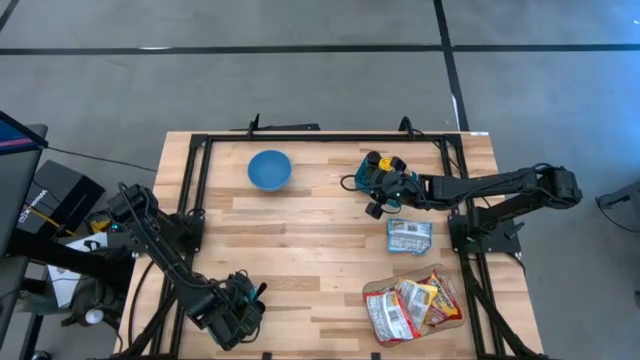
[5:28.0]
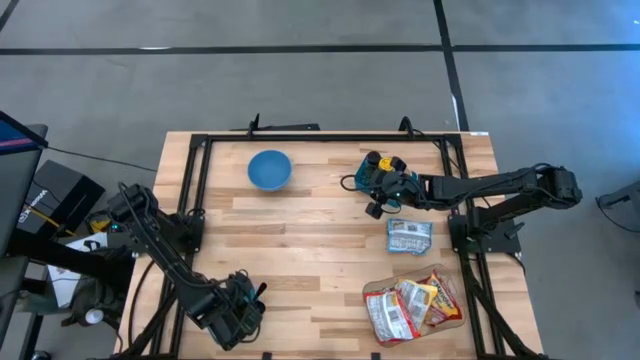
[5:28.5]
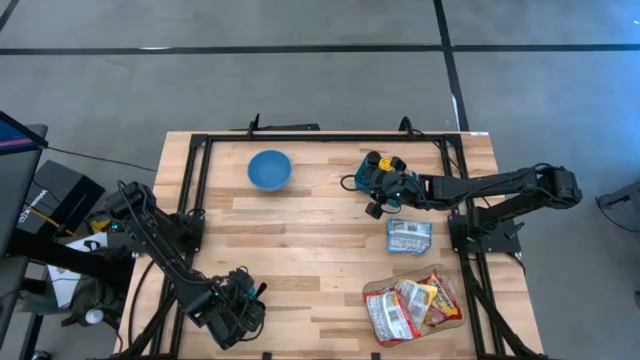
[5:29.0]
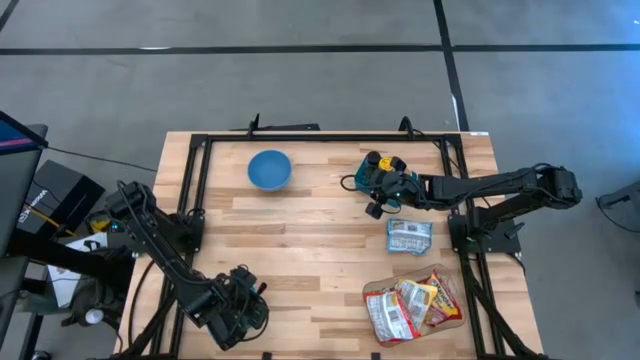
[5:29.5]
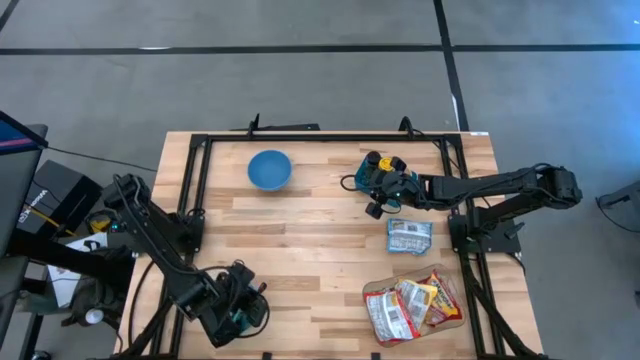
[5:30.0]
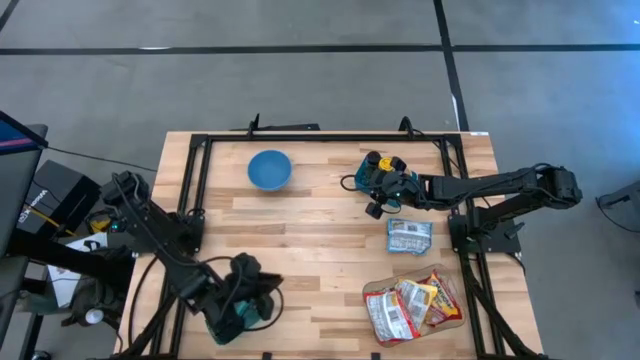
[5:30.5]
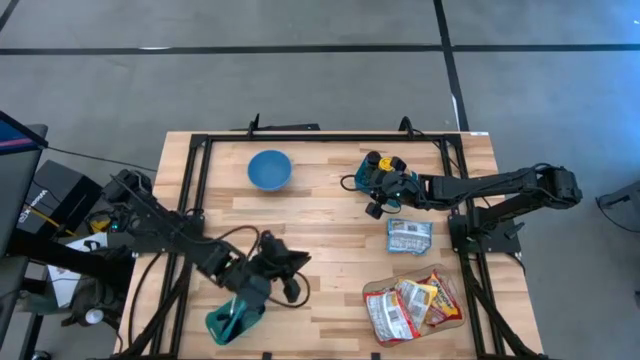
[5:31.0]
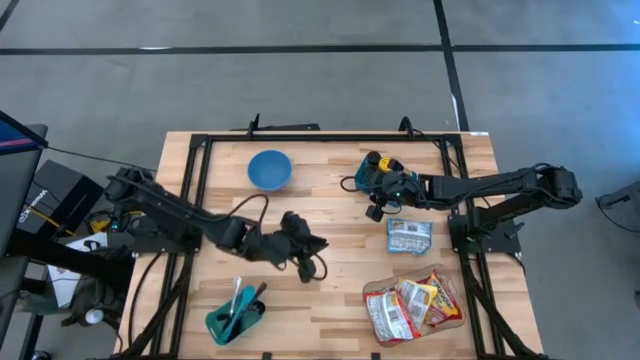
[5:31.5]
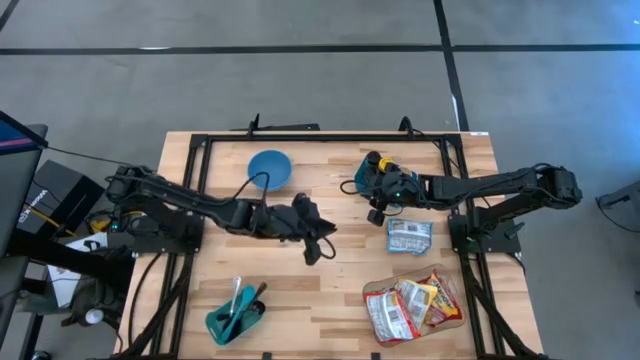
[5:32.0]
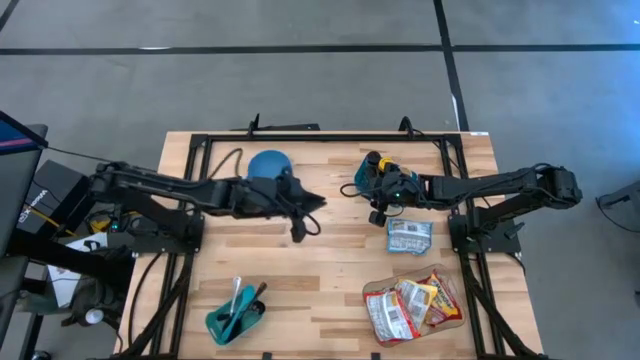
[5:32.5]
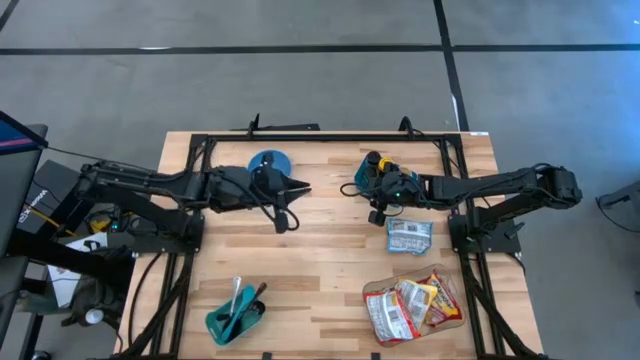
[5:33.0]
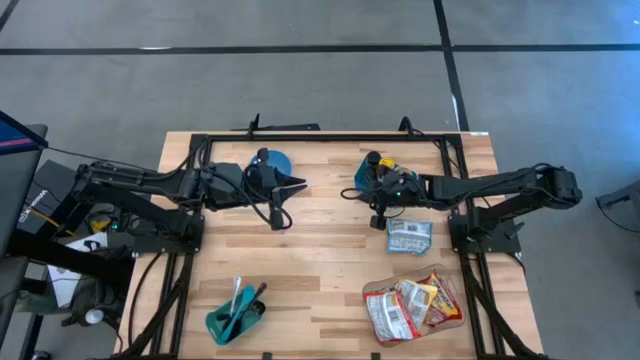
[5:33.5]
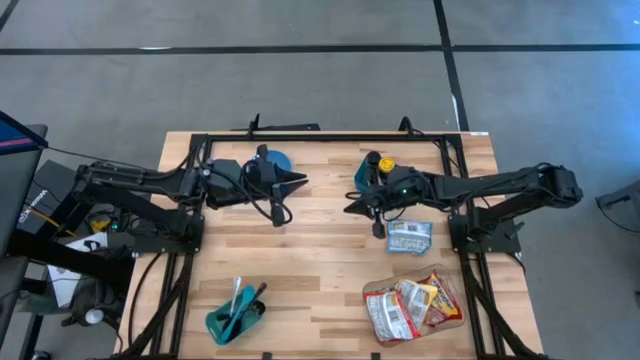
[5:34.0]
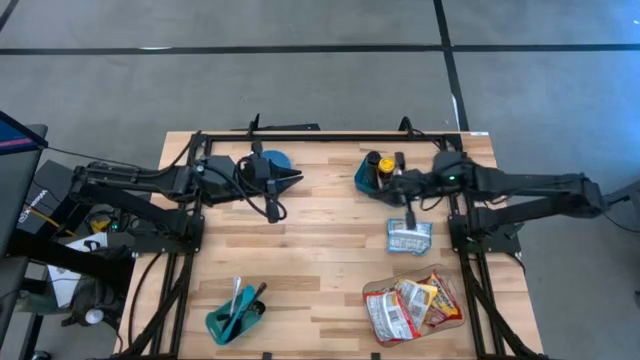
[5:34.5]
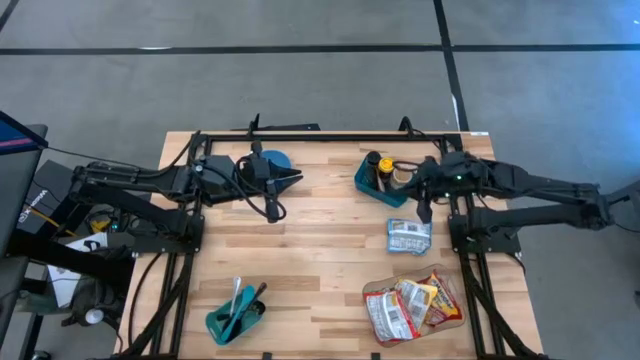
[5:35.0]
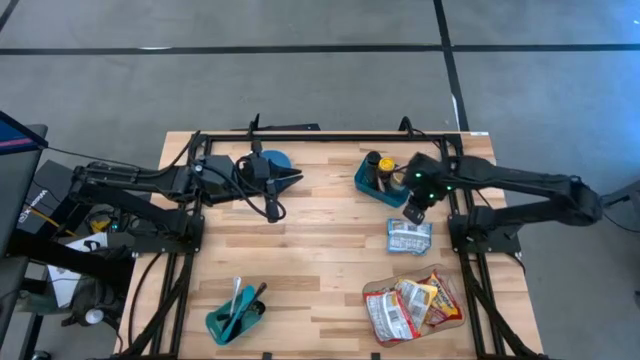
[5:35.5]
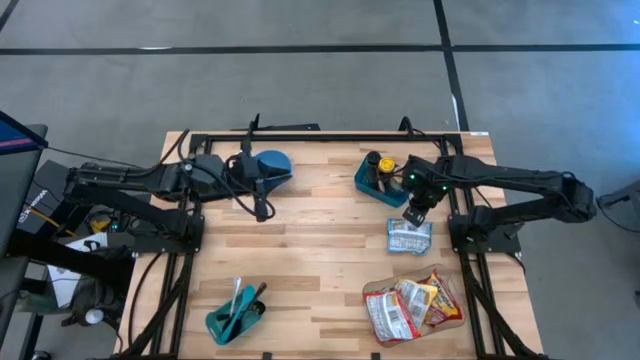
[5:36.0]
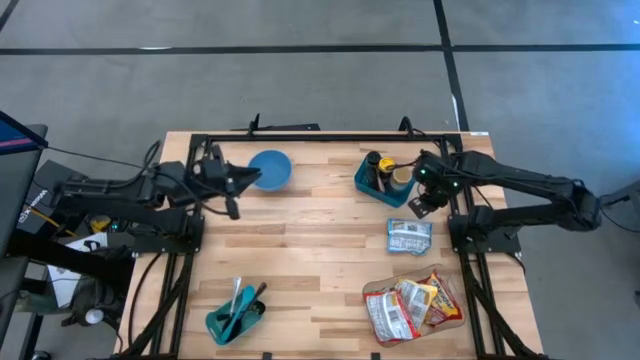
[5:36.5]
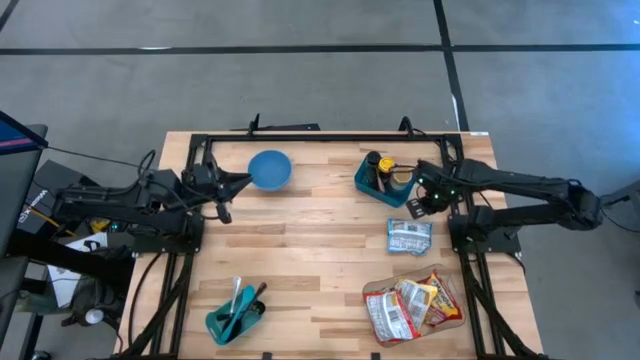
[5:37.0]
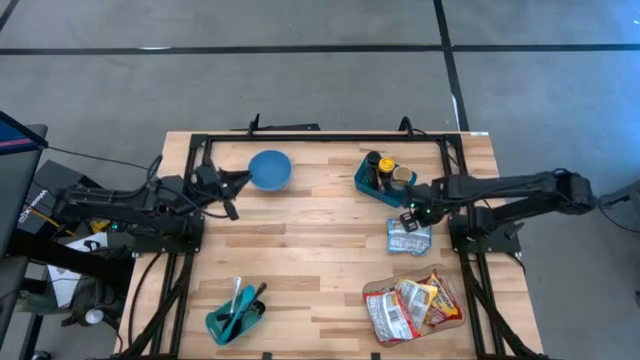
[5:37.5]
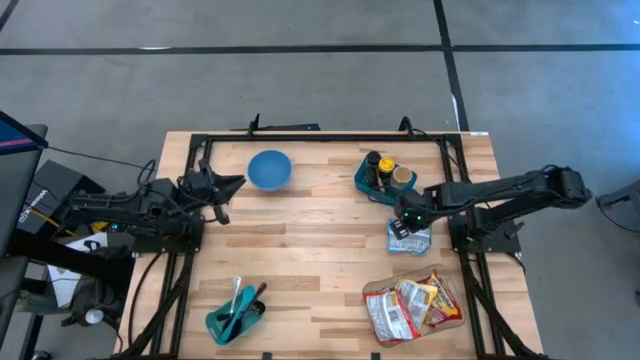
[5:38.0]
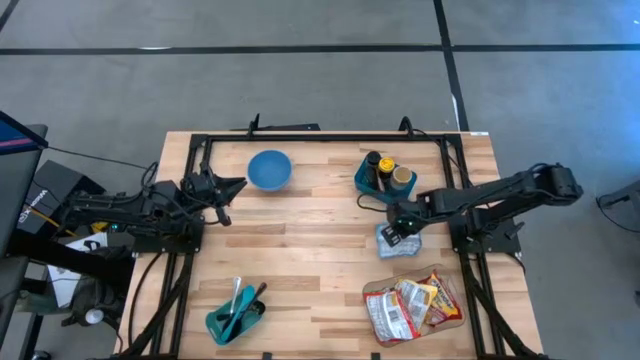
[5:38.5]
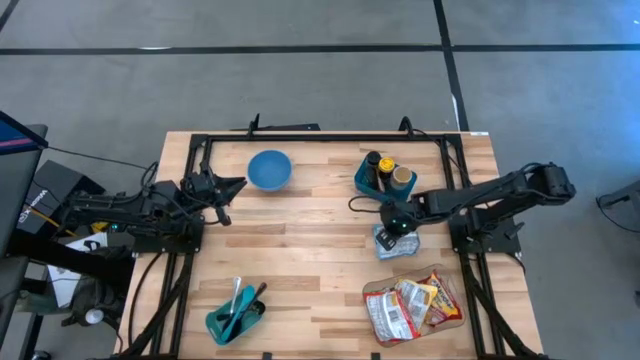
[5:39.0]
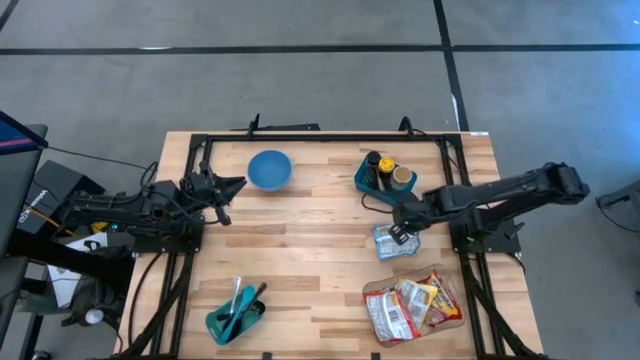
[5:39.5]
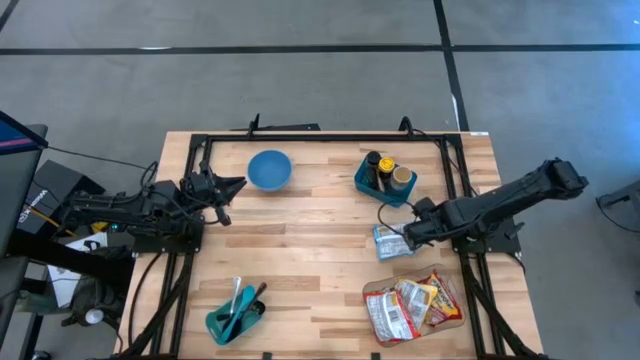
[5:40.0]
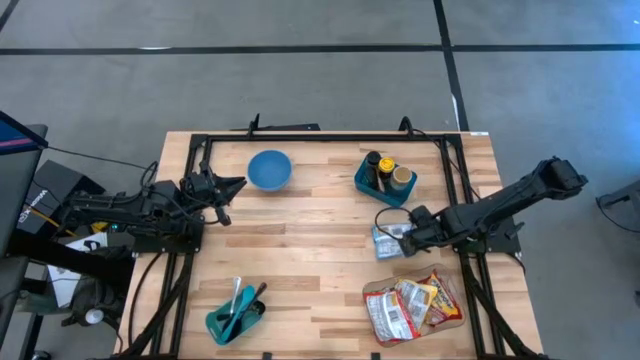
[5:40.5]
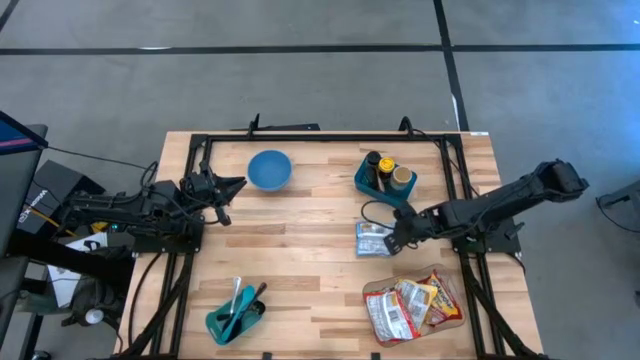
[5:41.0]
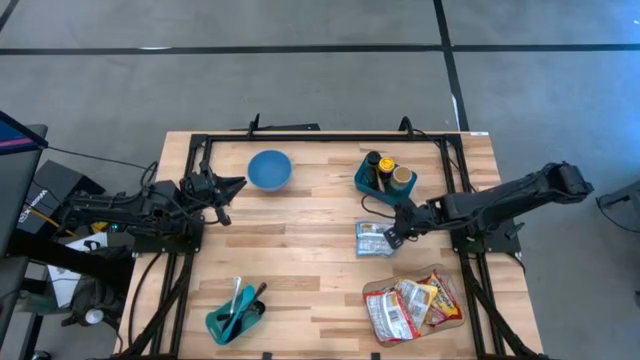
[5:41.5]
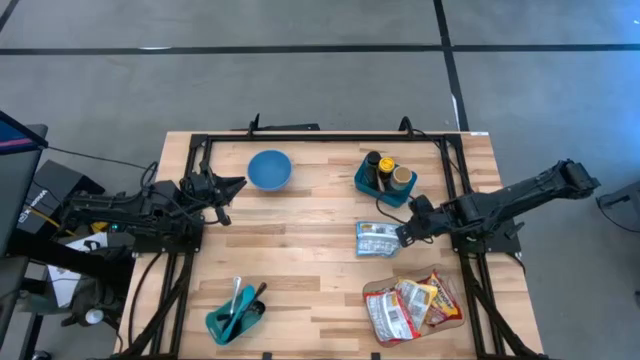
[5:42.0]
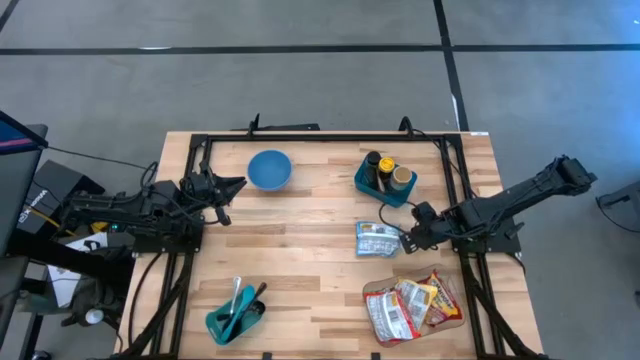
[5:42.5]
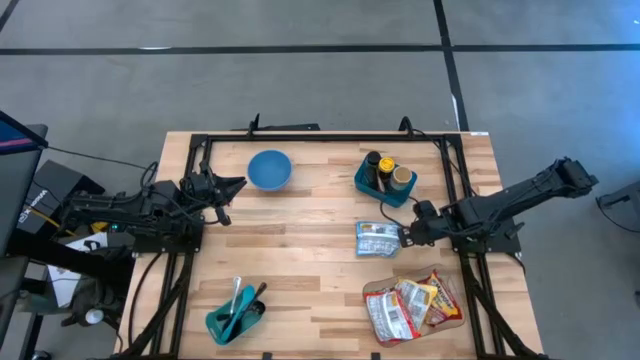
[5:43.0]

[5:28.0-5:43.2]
Task: Pick & Place Food Item
Put the blue noodle pack into the transparent bin

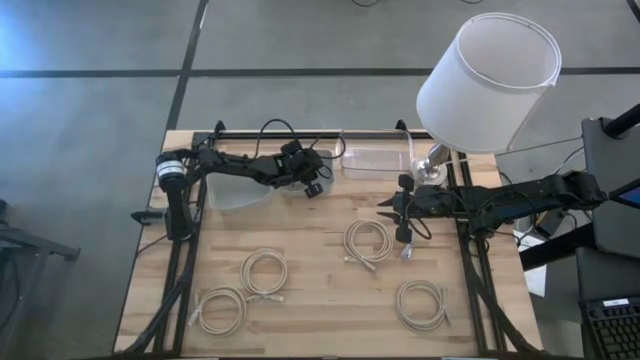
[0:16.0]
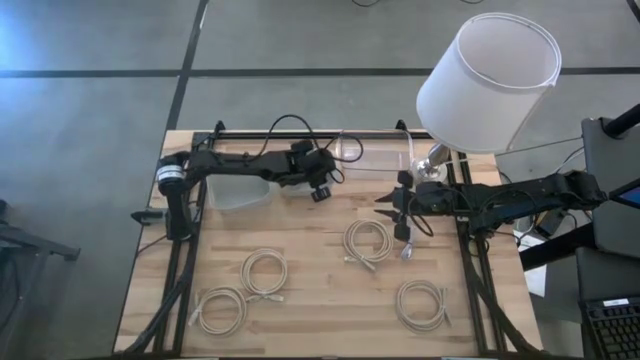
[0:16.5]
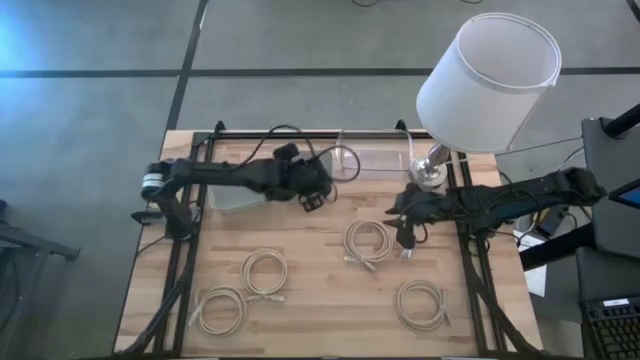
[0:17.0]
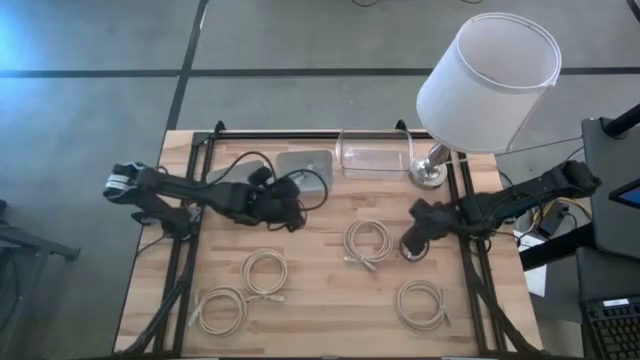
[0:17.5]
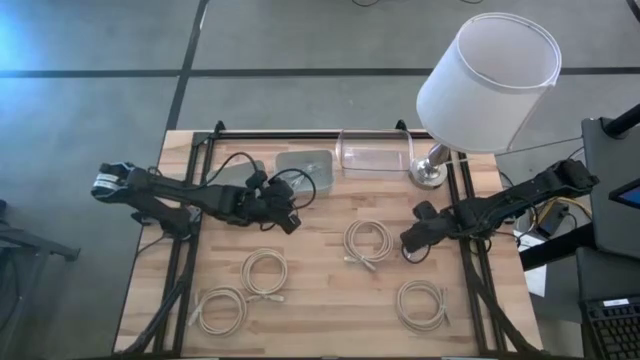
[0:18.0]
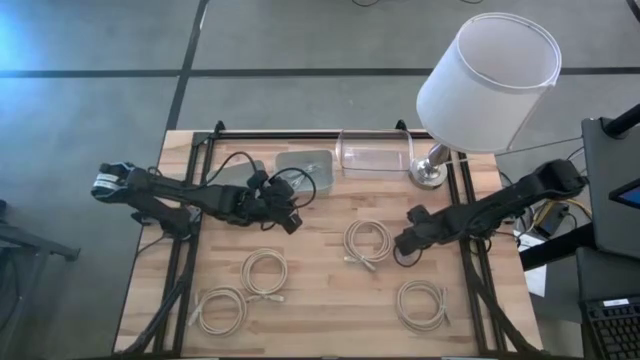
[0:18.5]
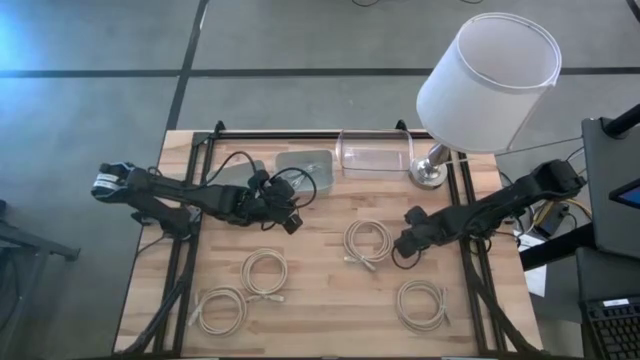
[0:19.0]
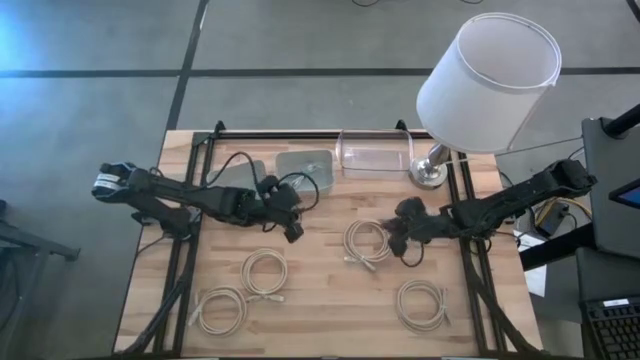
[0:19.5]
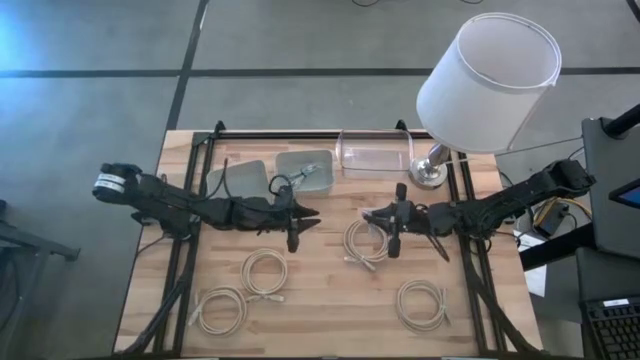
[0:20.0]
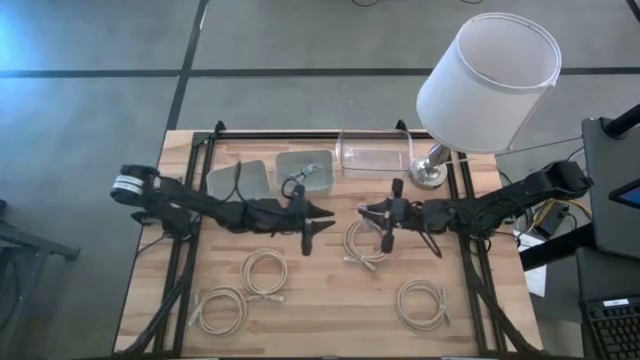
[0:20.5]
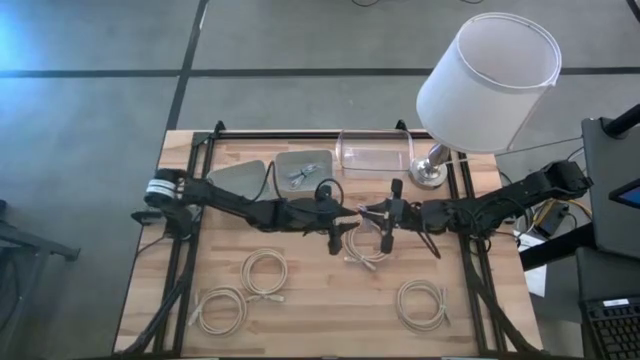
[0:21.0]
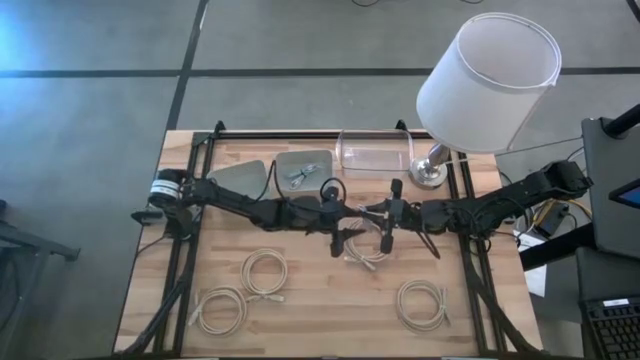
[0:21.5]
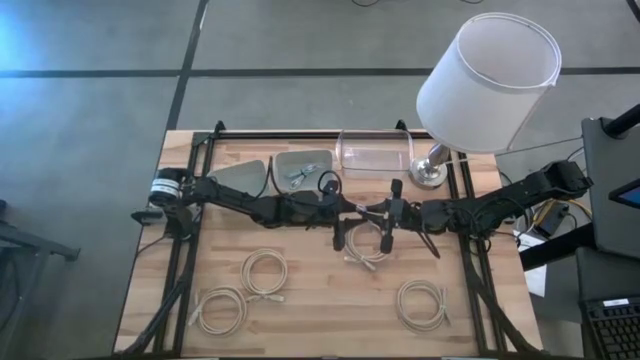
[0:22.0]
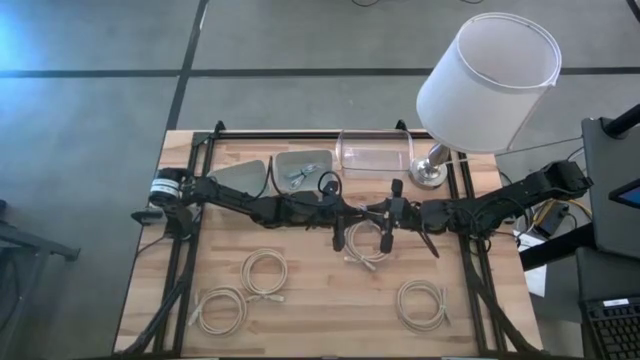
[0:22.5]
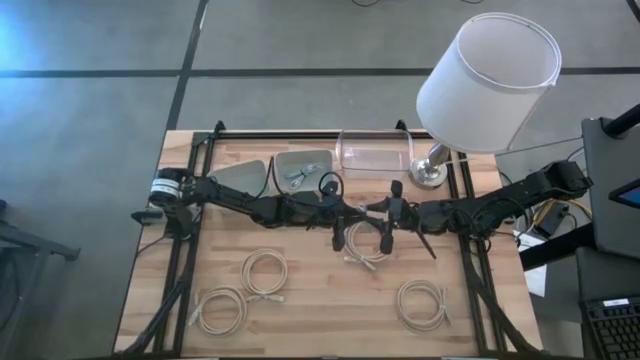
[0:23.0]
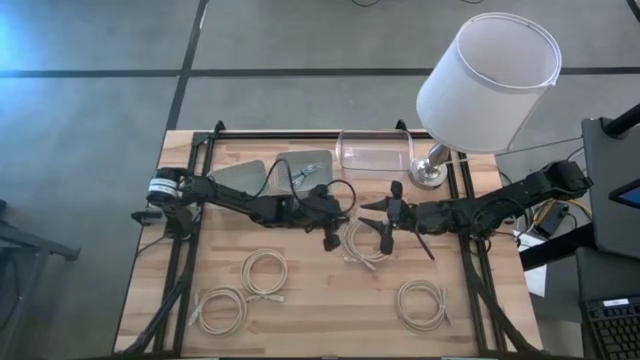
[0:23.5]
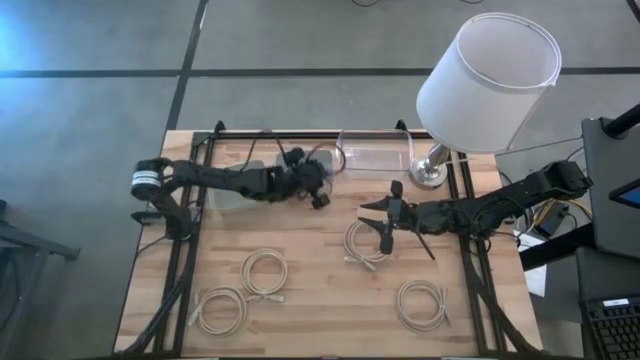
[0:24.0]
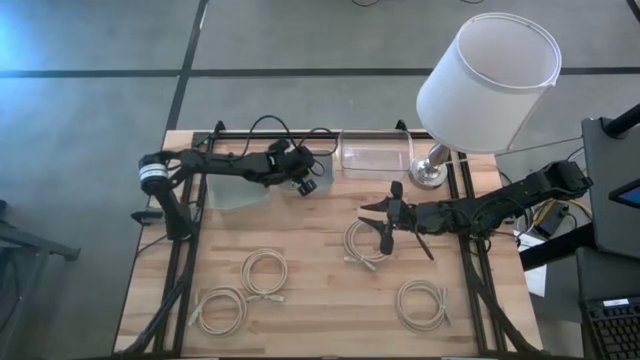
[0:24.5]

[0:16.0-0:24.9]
Task: Pick & Place USB Port
Put the purple charger cable into the right gray bin
